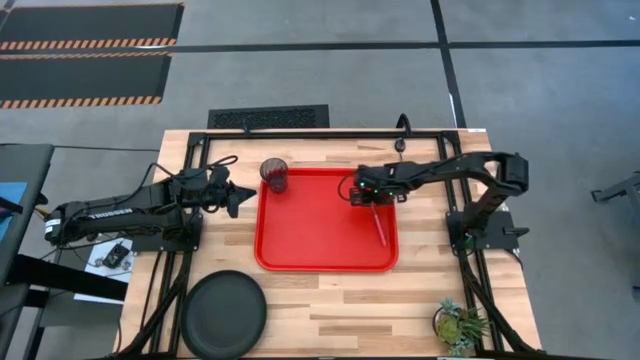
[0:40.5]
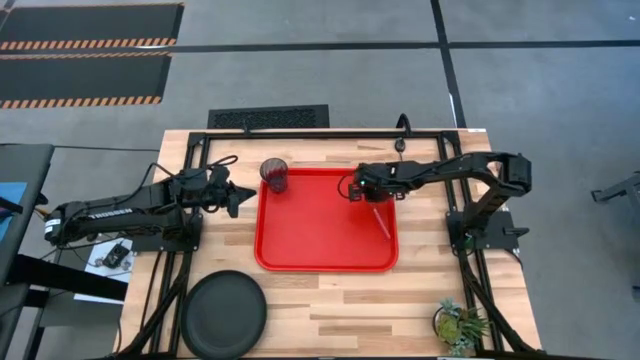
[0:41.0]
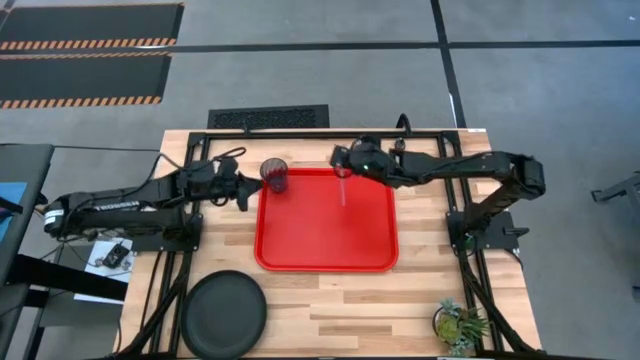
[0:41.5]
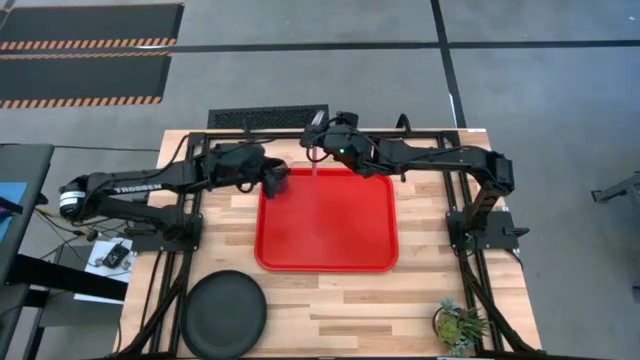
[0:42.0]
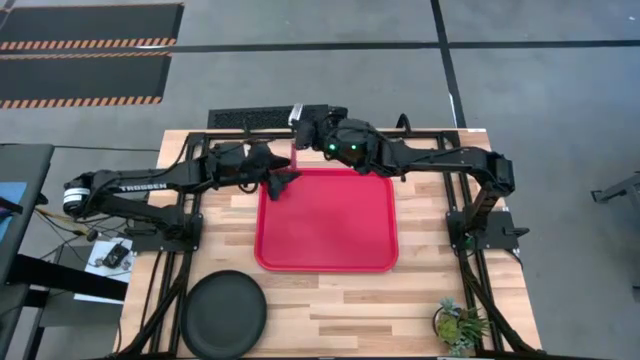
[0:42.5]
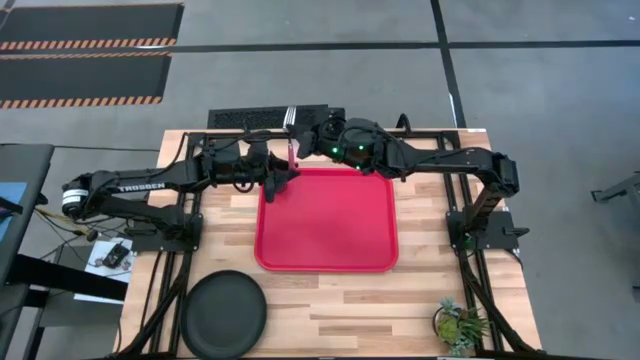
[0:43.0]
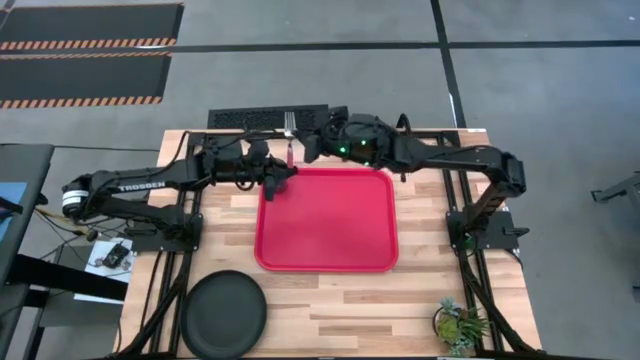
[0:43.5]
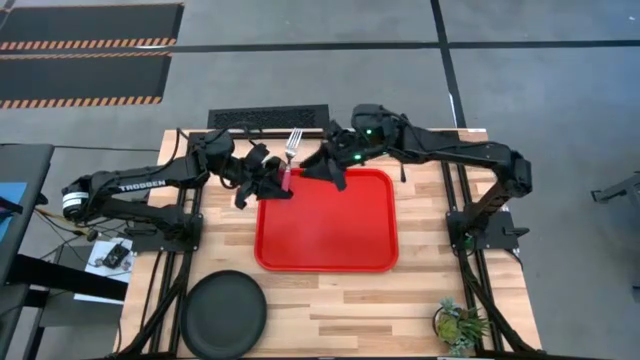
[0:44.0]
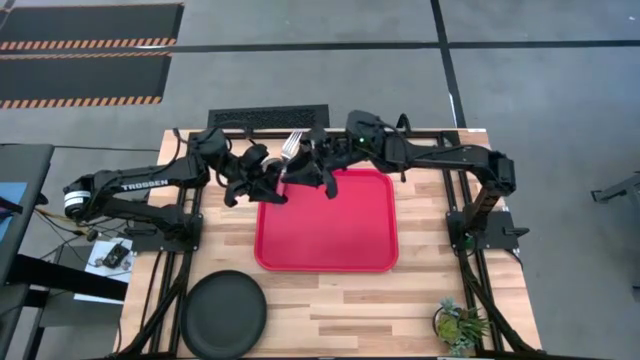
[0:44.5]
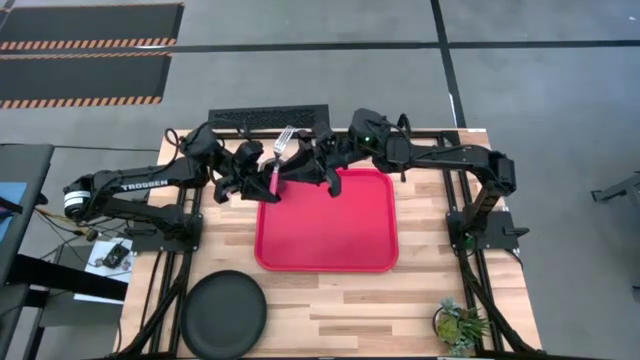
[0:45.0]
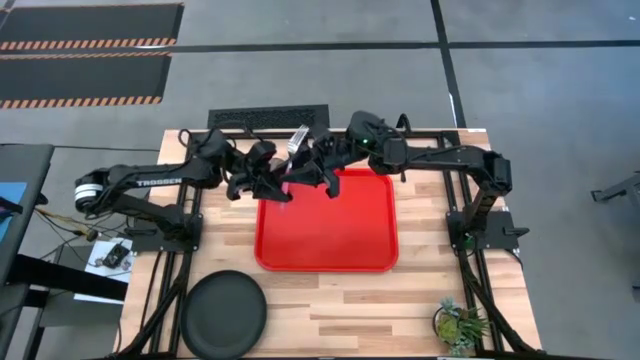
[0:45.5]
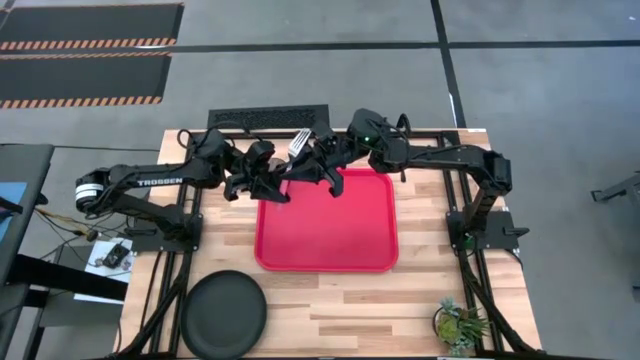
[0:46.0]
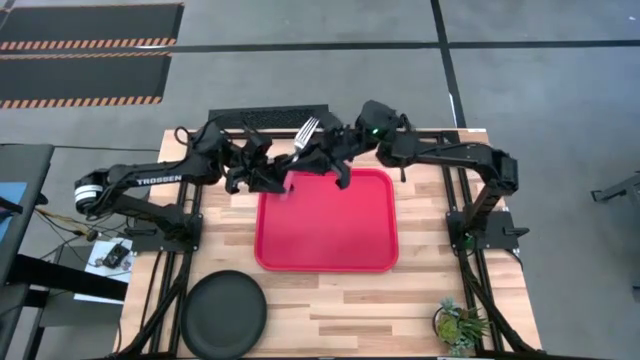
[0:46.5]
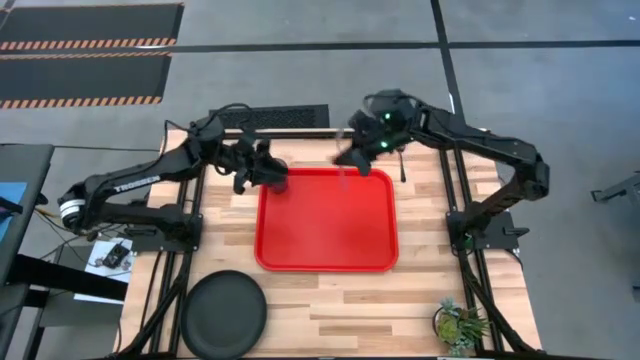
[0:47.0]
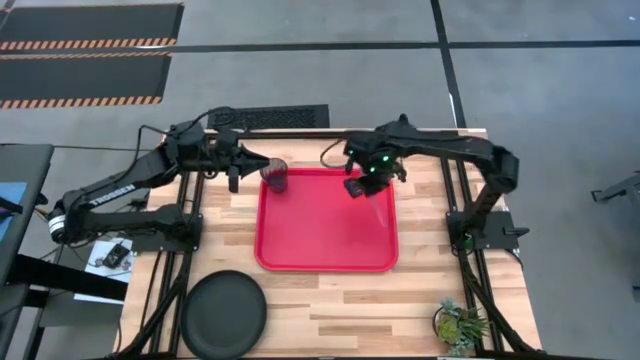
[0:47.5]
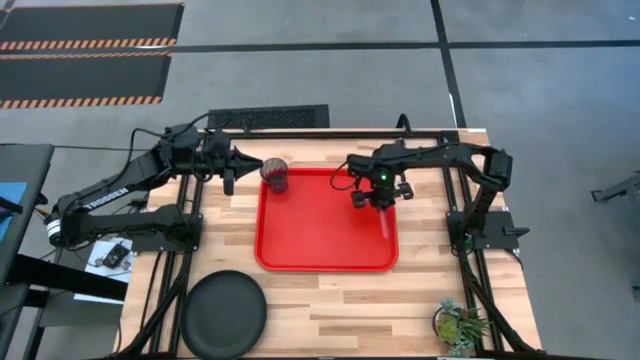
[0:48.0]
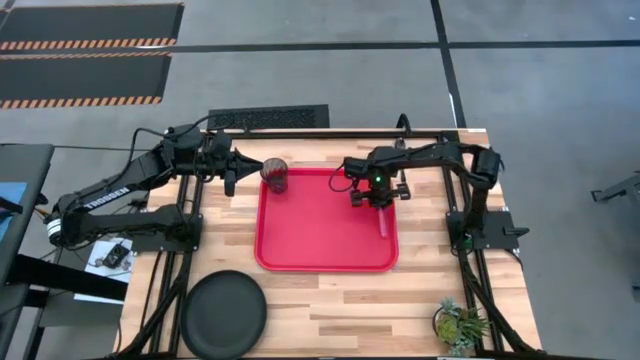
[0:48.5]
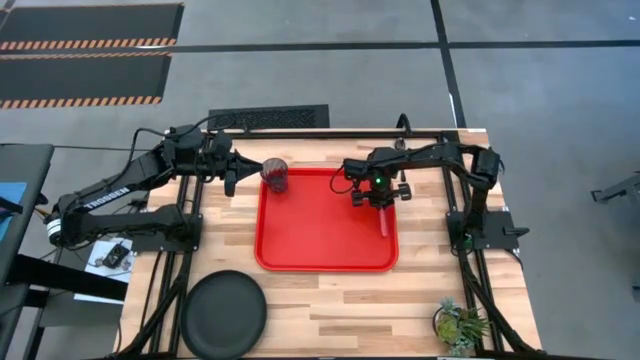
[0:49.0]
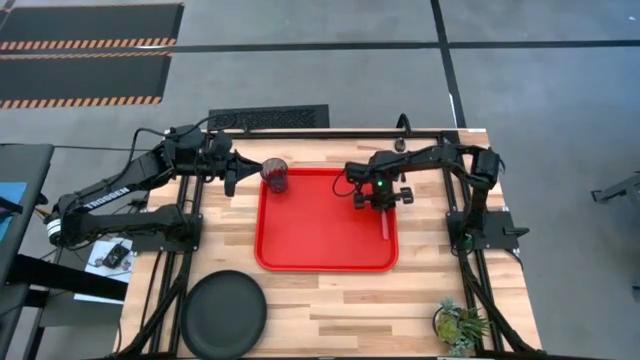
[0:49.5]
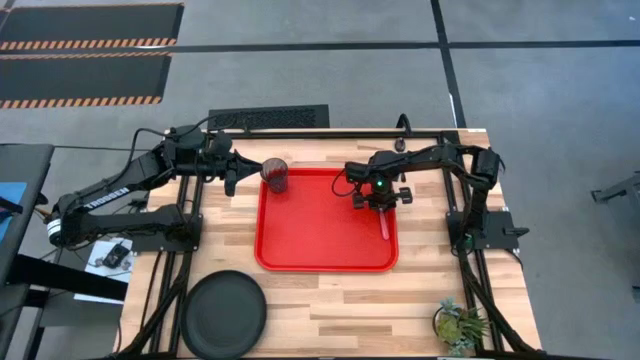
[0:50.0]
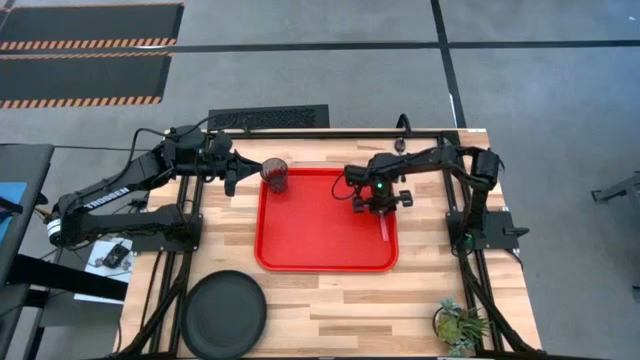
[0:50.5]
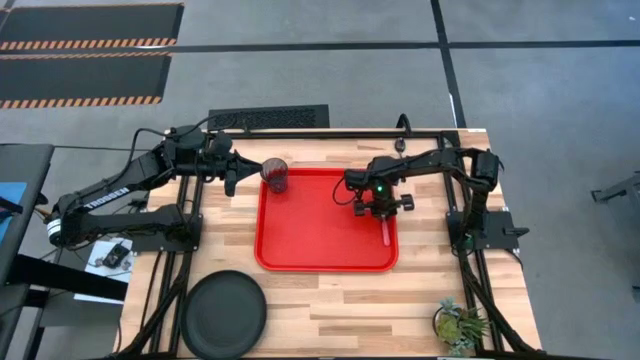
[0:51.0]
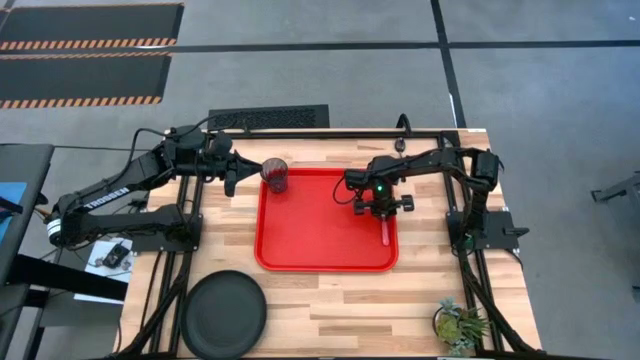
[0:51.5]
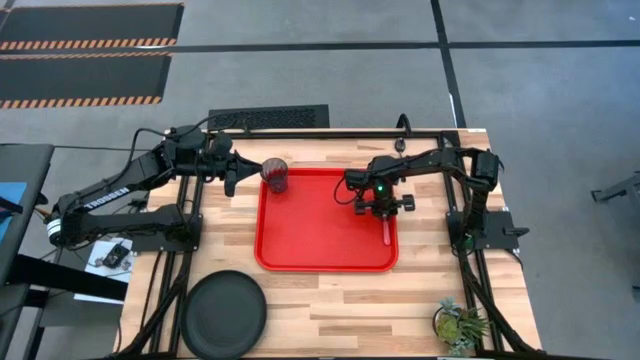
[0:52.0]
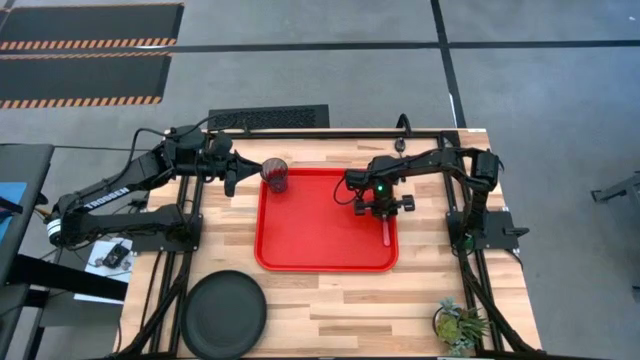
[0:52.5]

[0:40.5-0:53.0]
Task: Pick and place plate/cup/fork/spoon on tray
Put the pink fork on the right side of the red tray

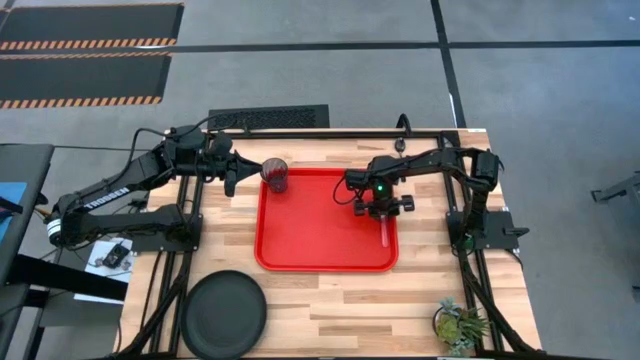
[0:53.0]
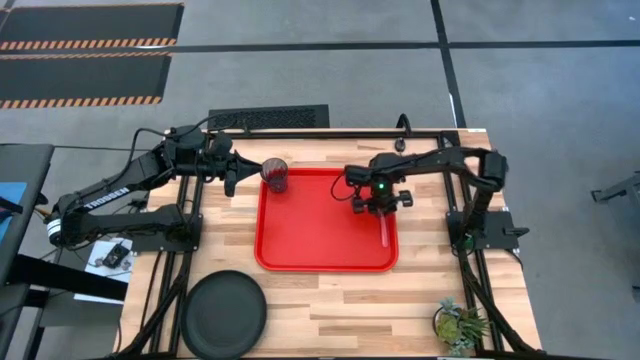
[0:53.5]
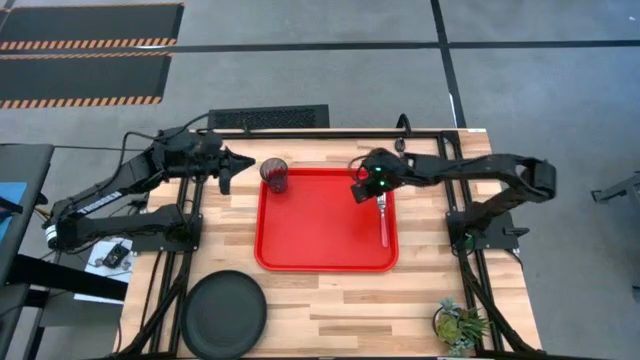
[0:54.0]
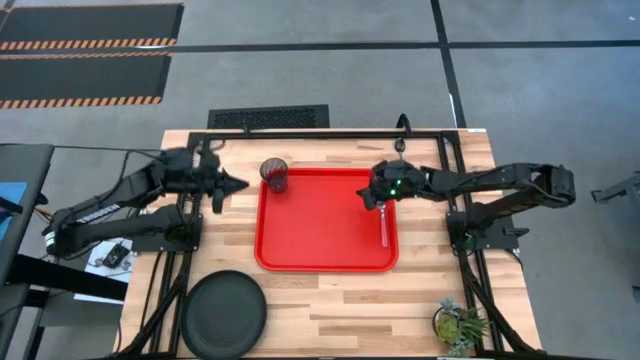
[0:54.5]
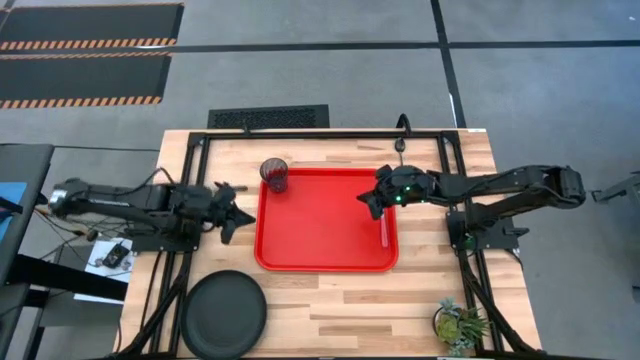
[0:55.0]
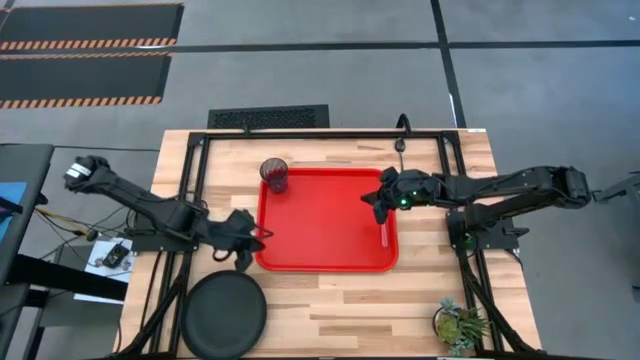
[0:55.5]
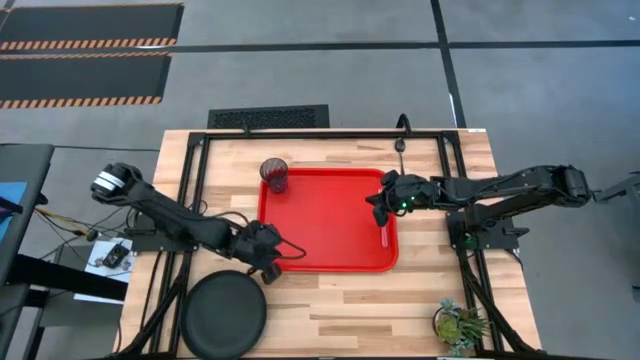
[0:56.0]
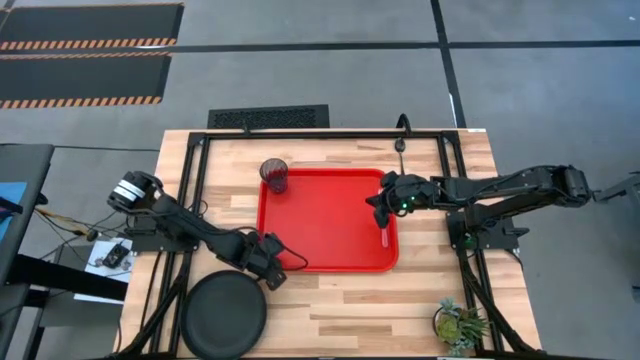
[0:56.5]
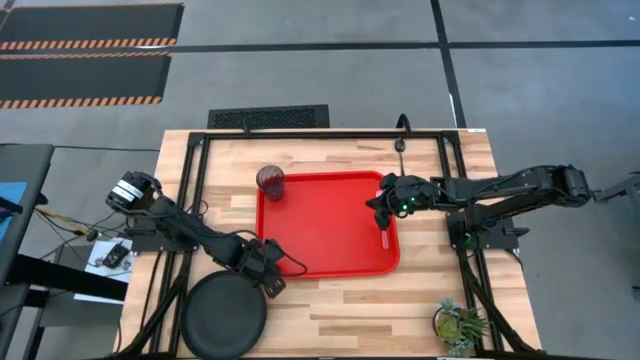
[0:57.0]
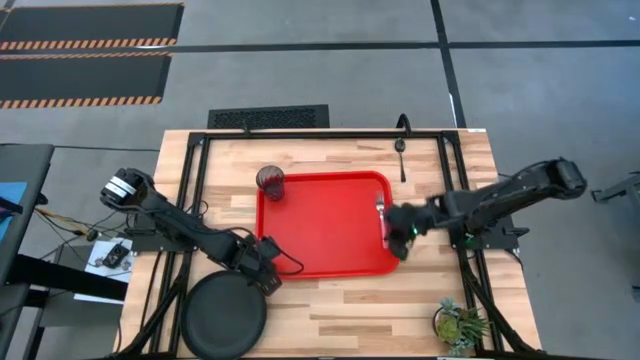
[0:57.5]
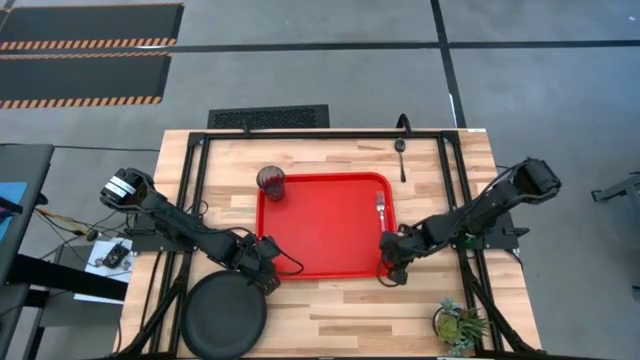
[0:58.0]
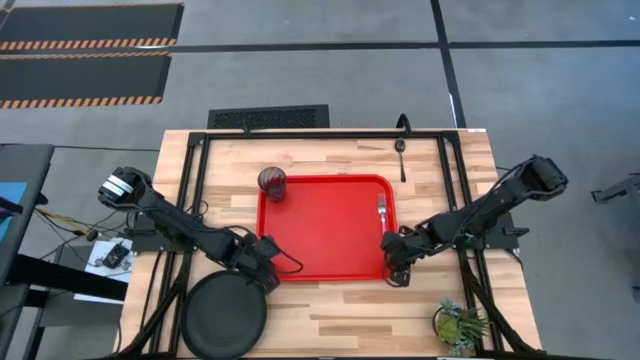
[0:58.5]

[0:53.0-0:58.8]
Adjust the red tray

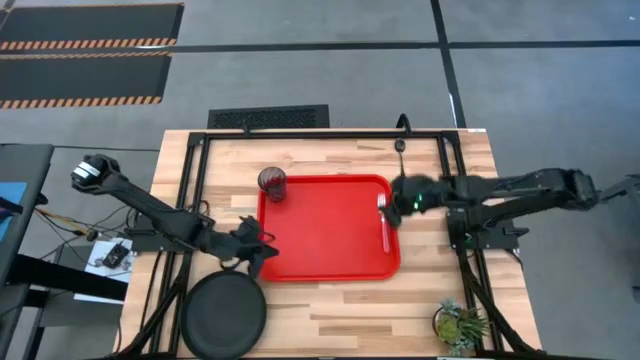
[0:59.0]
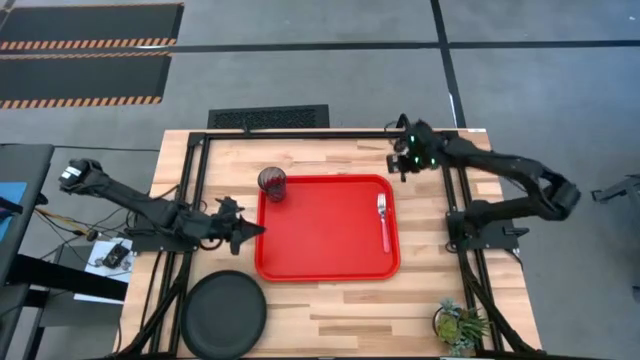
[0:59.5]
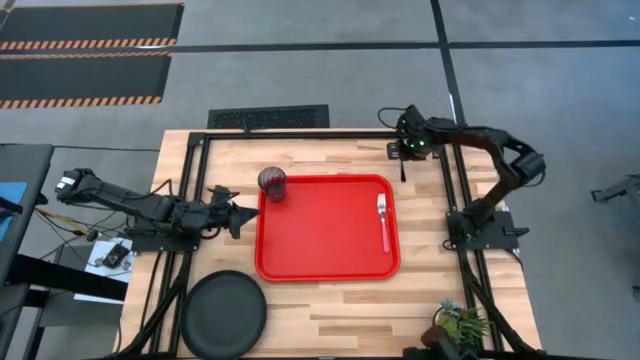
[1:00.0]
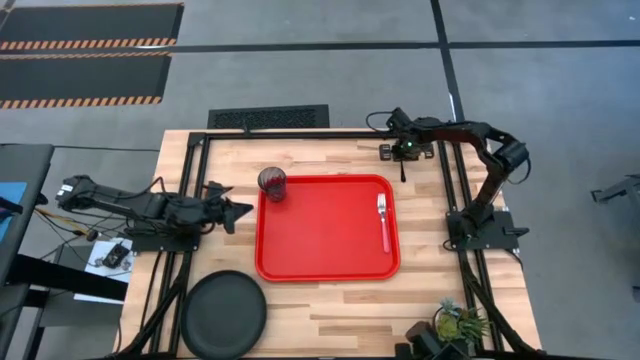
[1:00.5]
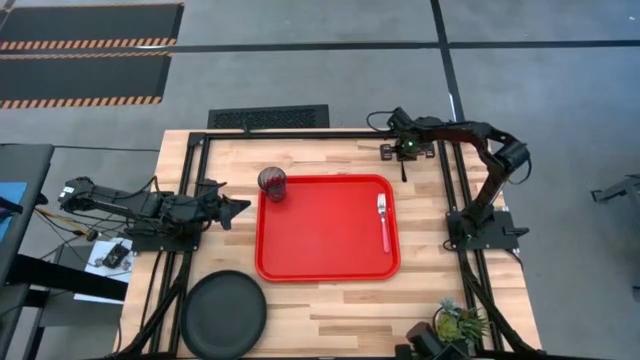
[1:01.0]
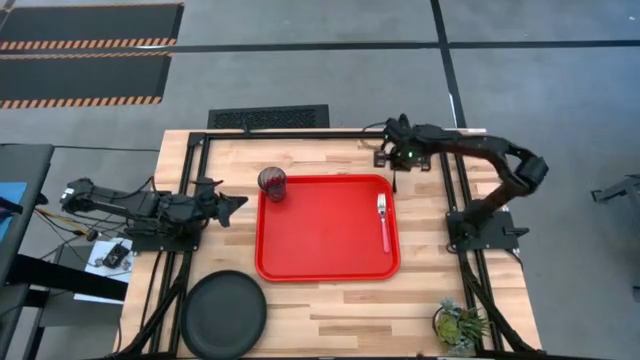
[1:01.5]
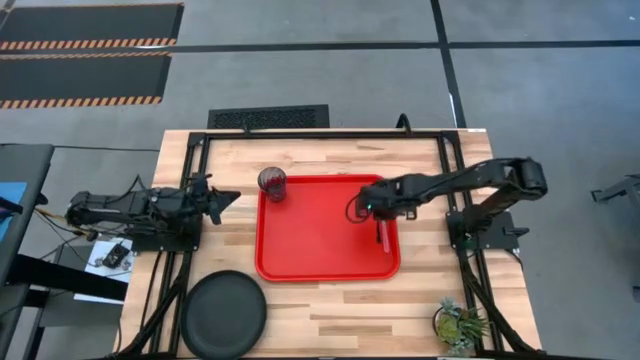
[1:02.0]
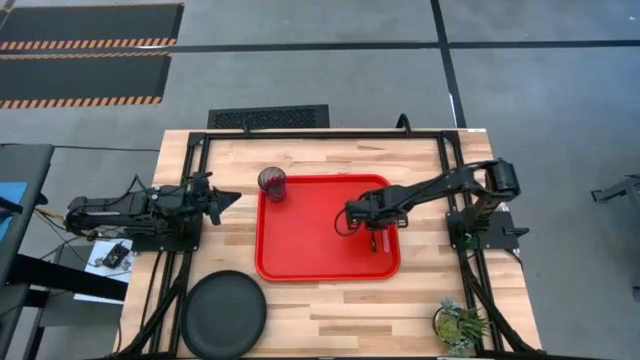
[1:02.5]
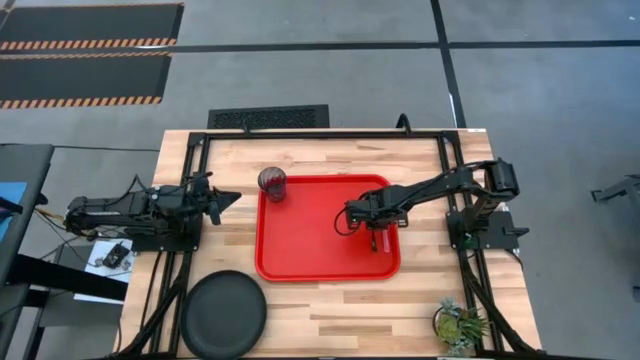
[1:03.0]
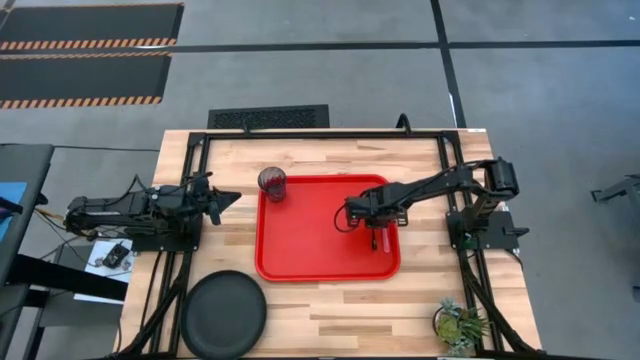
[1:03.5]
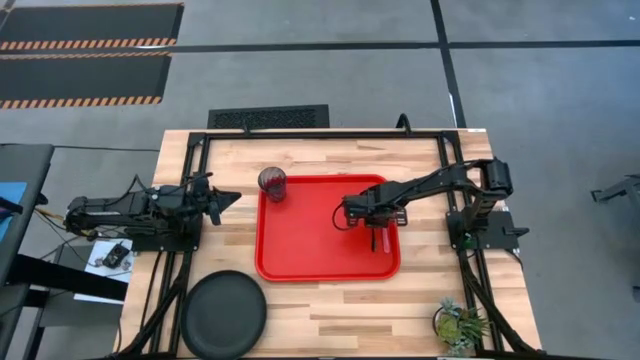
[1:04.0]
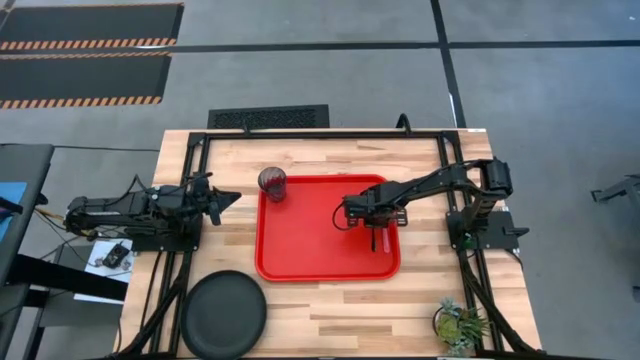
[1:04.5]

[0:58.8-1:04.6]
Put the spoon to the left of the pink fork on the tray
